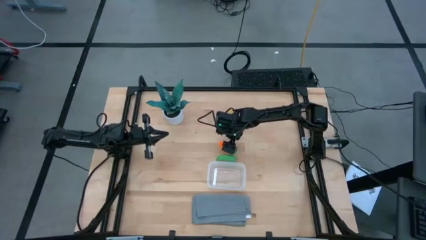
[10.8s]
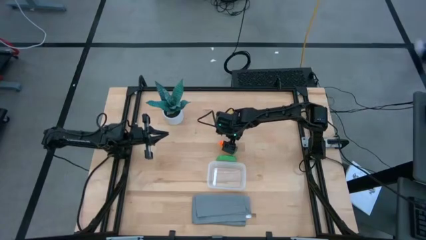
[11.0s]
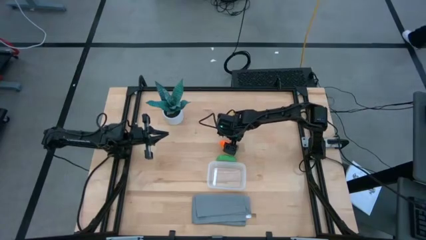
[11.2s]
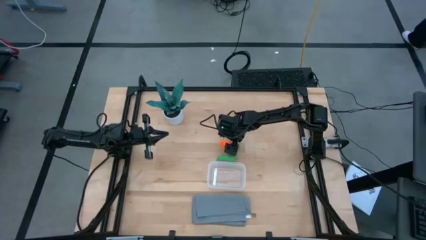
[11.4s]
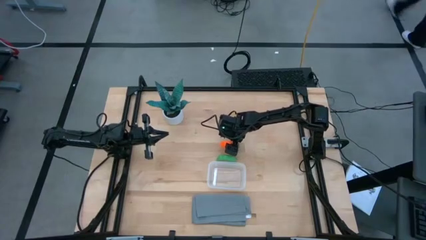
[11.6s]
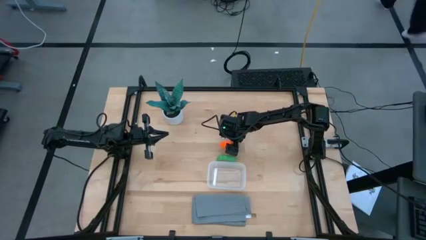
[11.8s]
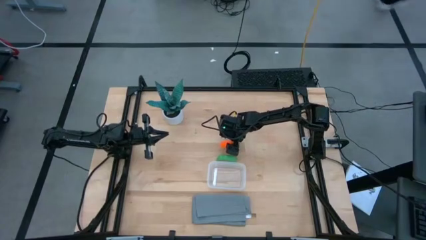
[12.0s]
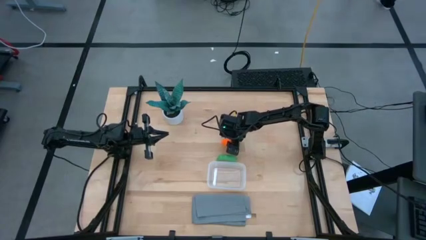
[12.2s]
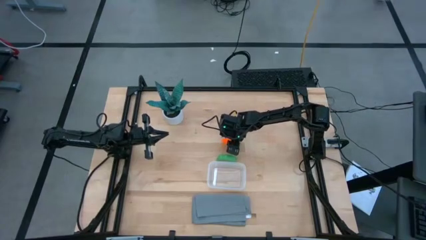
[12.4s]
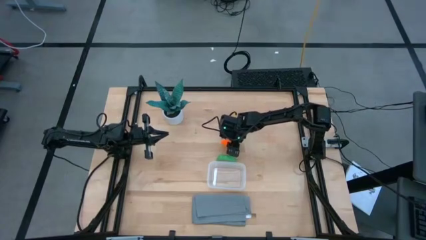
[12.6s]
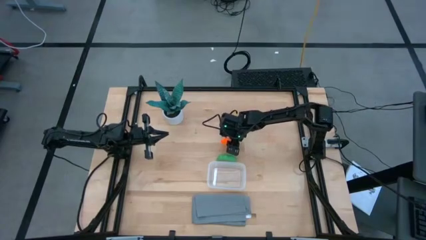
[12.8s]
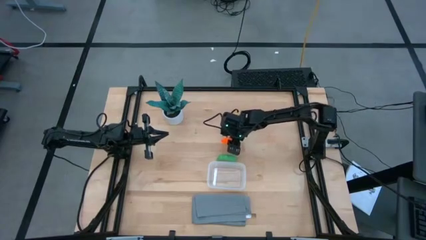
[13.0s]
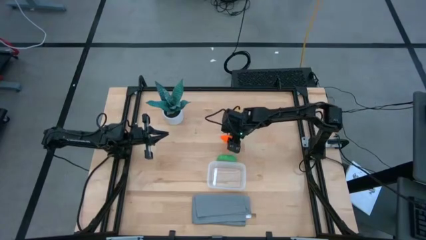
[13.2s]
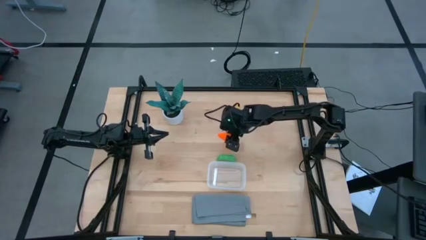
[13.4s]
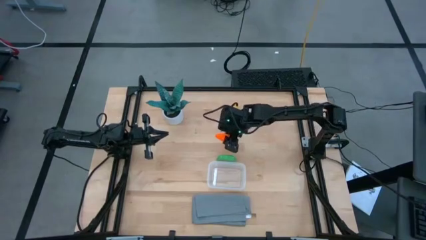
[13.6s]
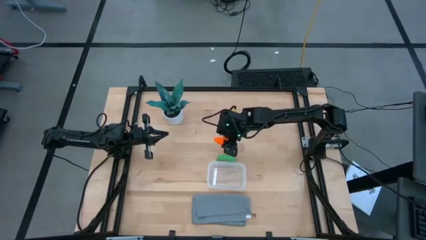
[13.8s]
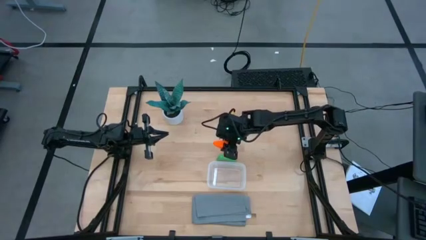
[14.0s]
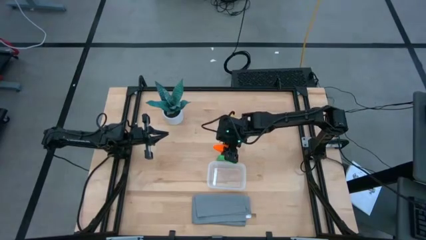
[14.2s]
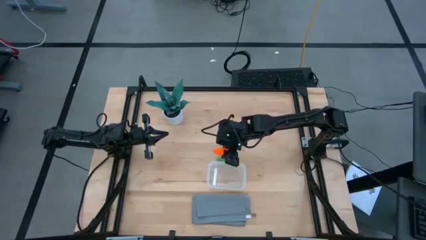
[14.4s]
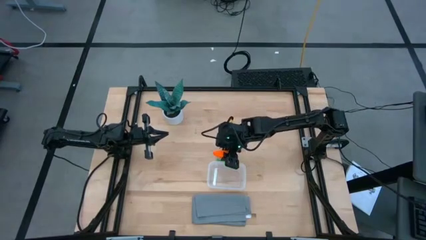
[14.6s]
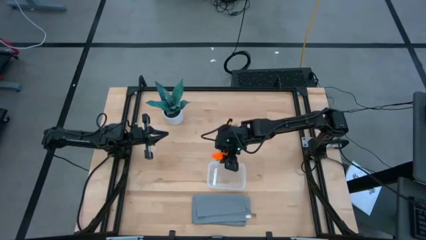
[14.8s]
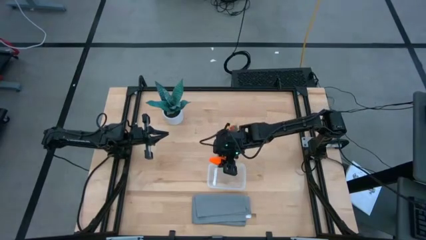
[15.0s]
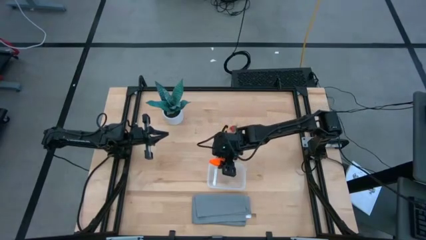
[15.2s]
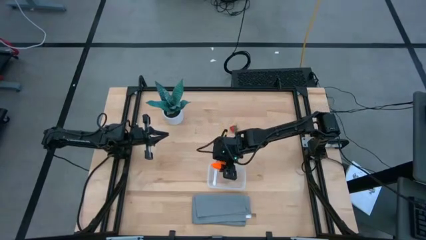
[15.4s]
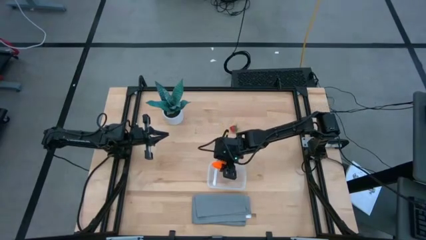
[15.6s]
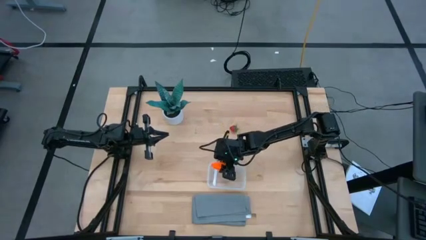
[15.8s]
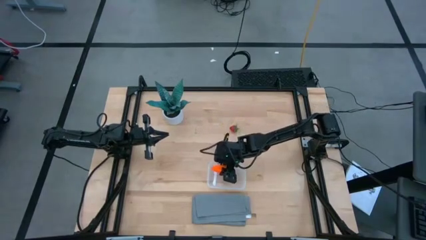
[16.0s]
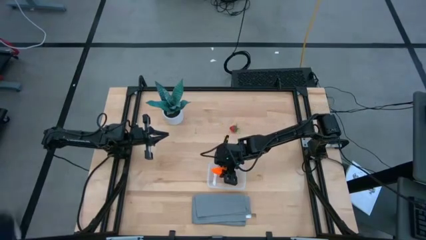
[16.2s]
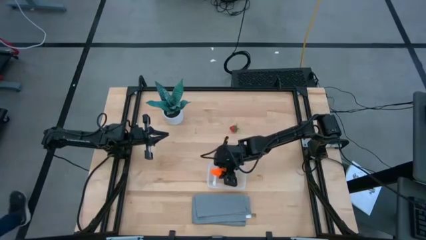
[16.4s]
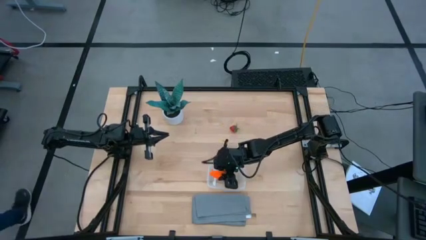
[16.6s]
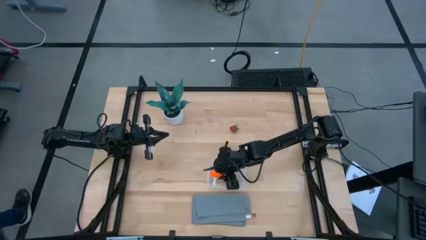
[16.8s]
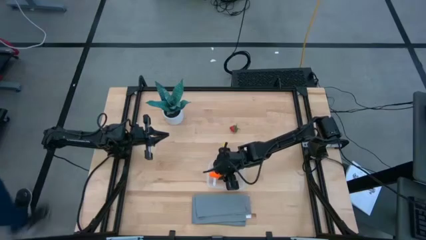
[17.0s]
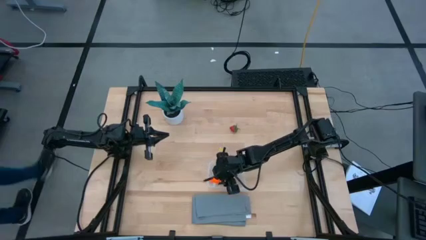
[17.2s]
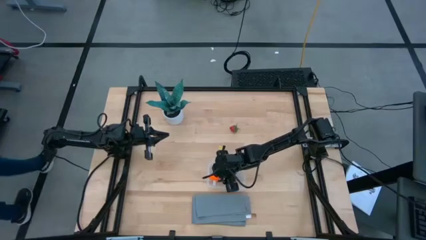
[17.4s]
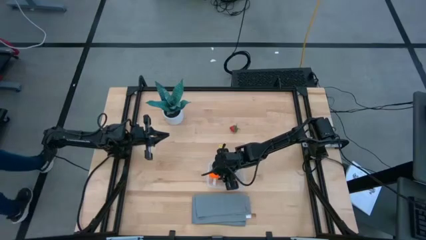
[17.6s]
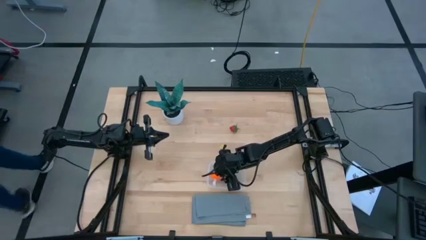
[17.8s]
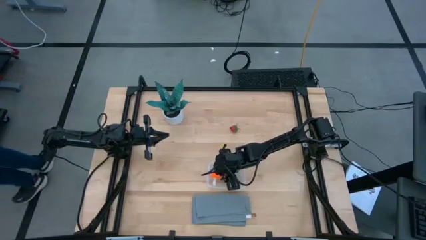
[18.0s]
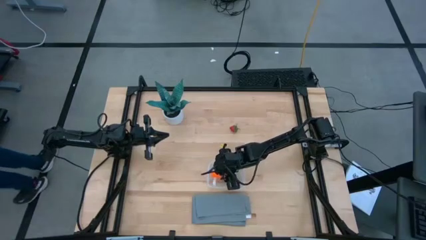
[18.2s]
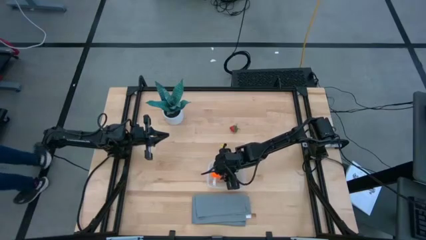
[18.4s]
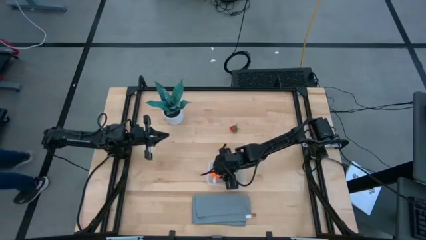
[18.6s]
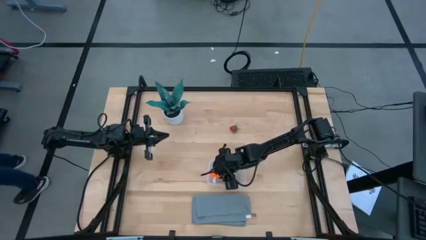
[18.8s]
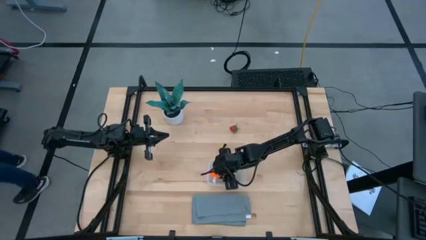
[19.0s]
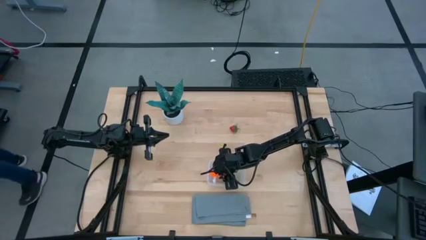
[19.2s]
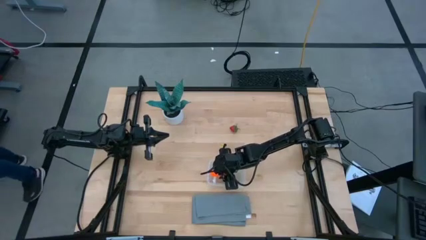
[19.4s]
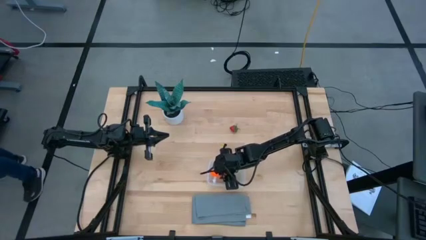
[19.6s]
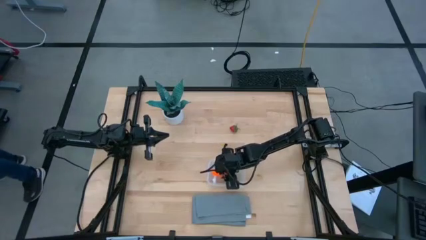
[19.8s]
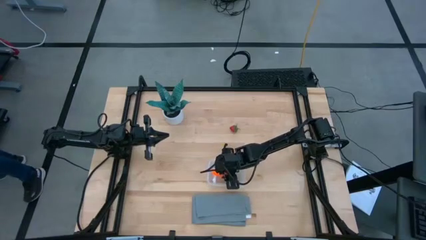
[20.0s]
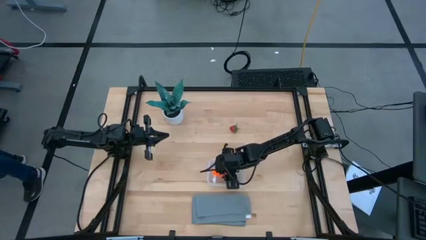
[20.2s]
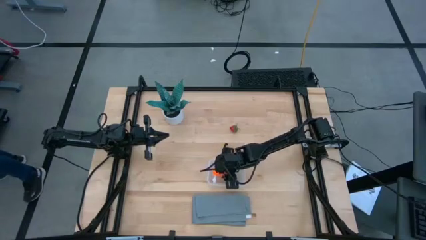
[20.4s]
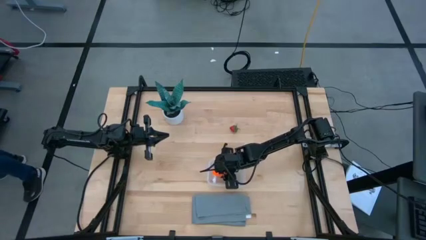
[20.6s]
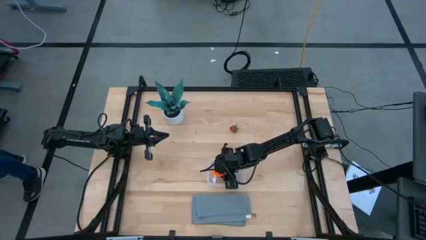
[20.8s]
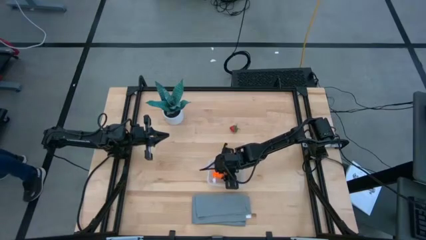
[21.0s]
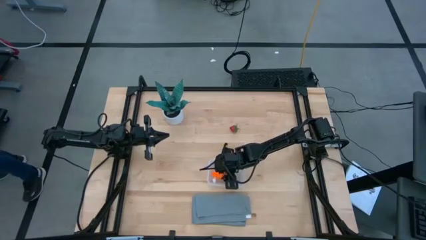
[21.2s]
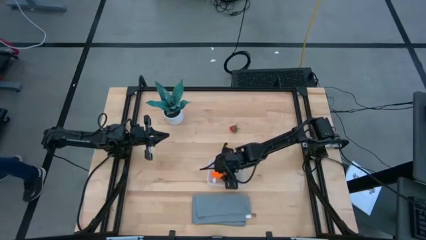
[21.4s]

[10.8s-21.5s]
Task: Pick and placing Produce into tupperware
Put the carrot into the transparent bin
